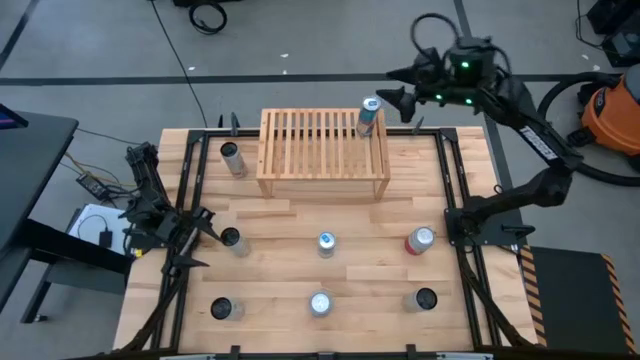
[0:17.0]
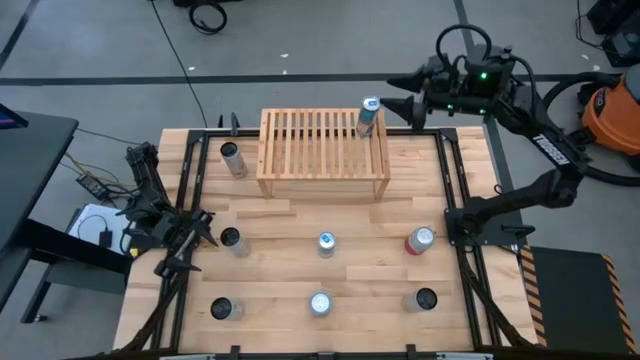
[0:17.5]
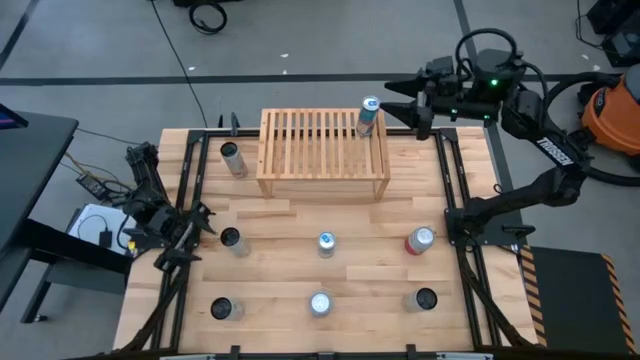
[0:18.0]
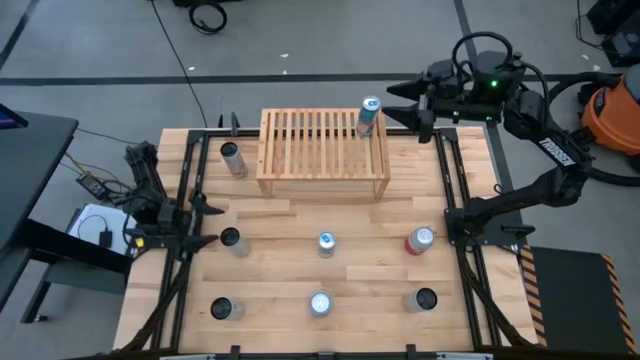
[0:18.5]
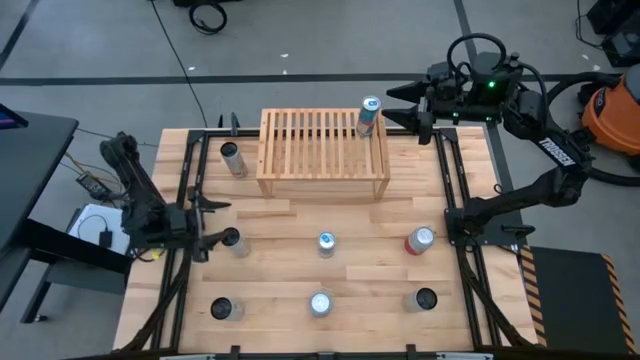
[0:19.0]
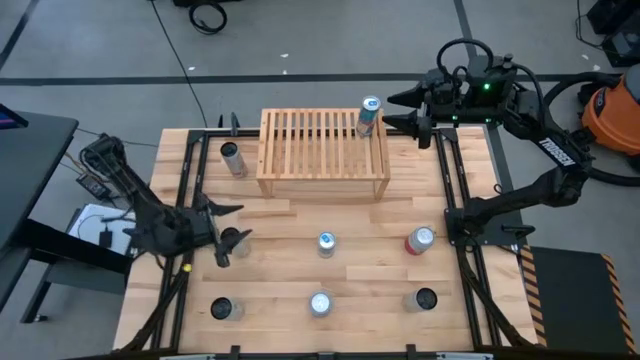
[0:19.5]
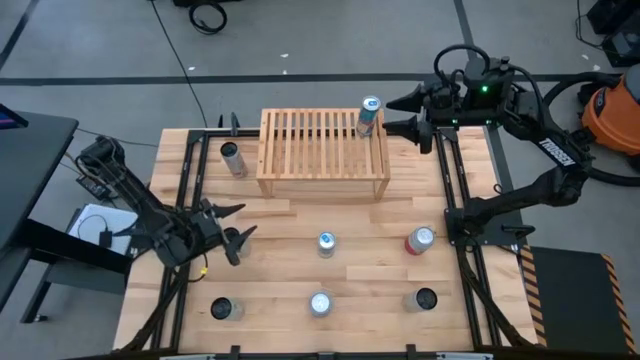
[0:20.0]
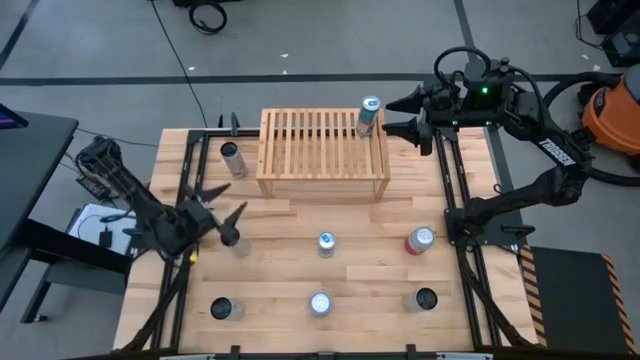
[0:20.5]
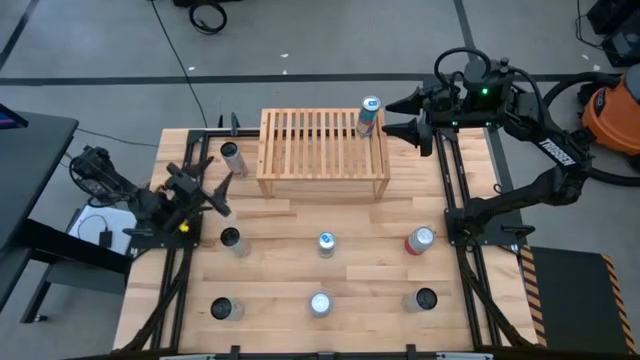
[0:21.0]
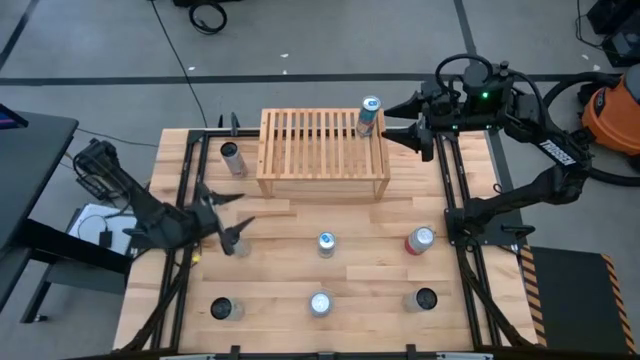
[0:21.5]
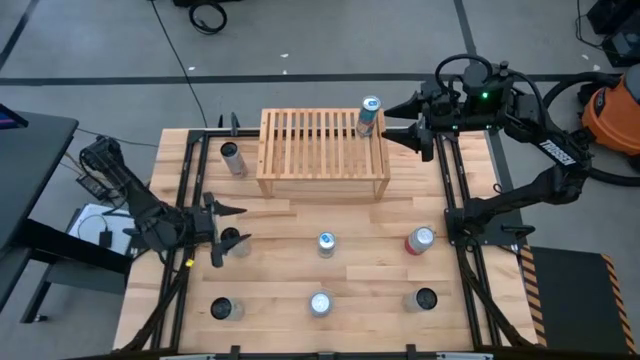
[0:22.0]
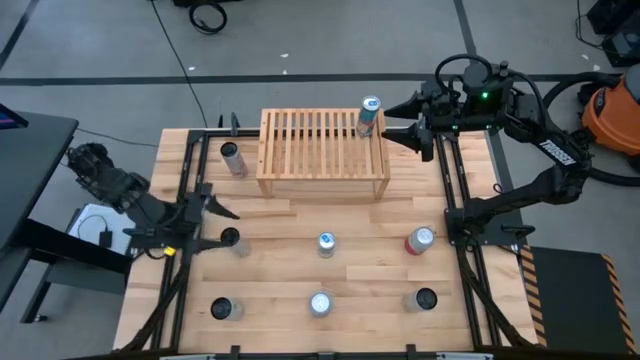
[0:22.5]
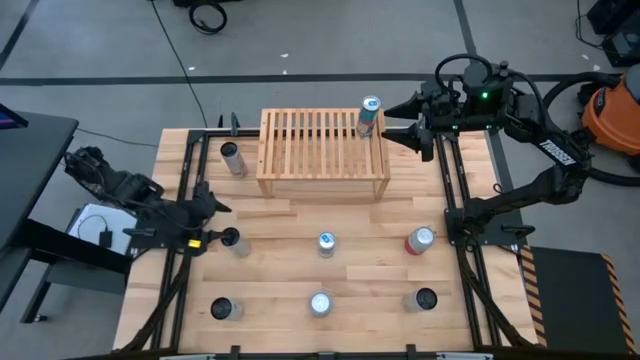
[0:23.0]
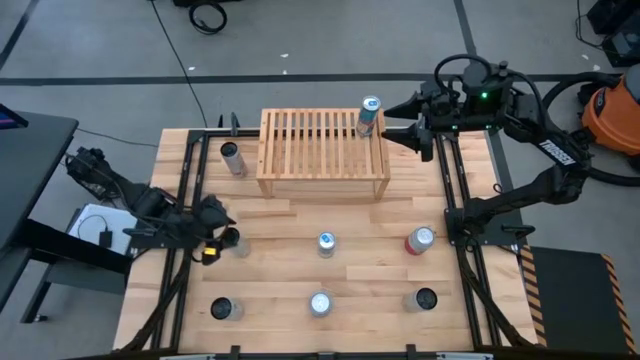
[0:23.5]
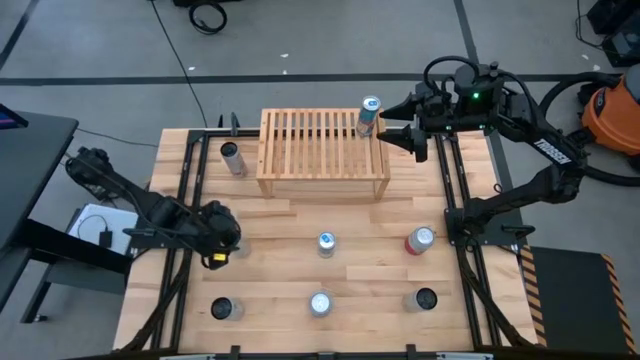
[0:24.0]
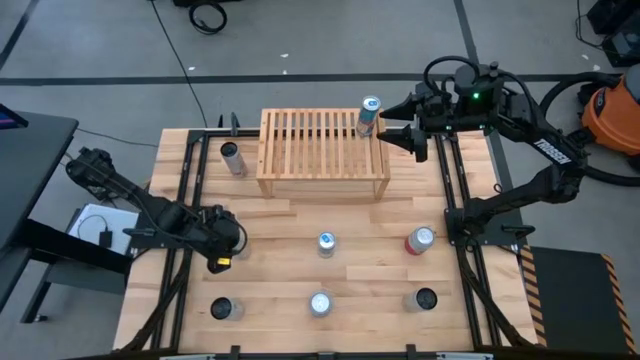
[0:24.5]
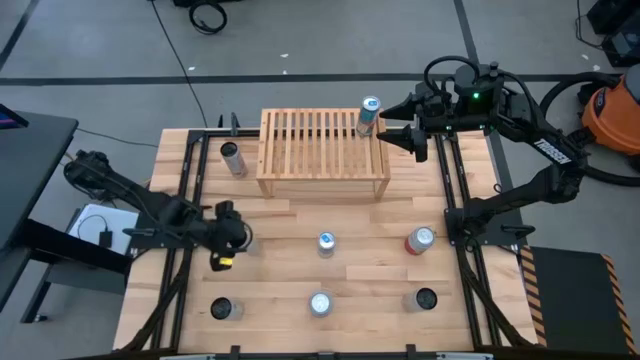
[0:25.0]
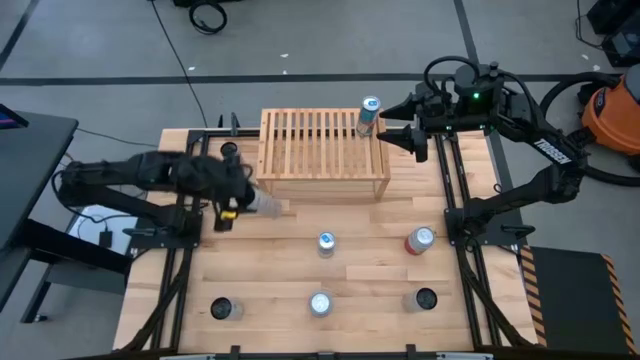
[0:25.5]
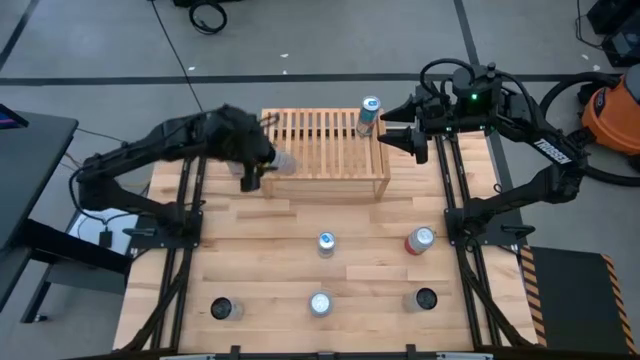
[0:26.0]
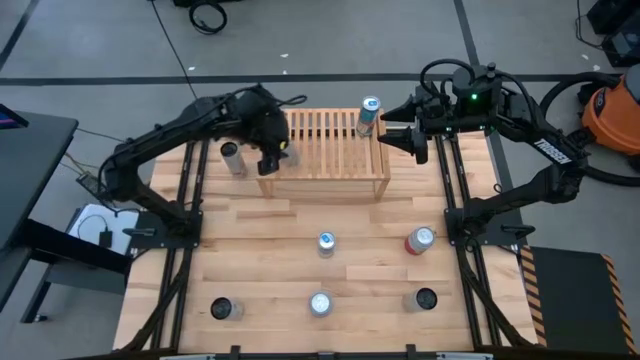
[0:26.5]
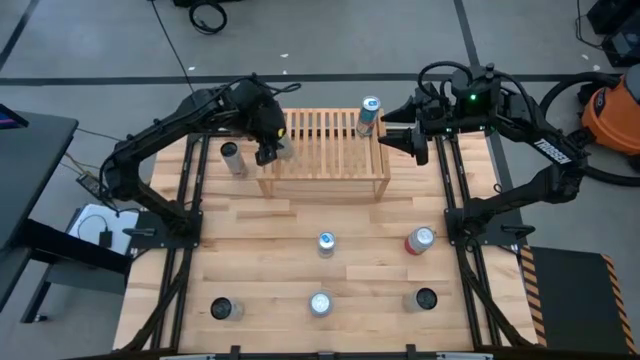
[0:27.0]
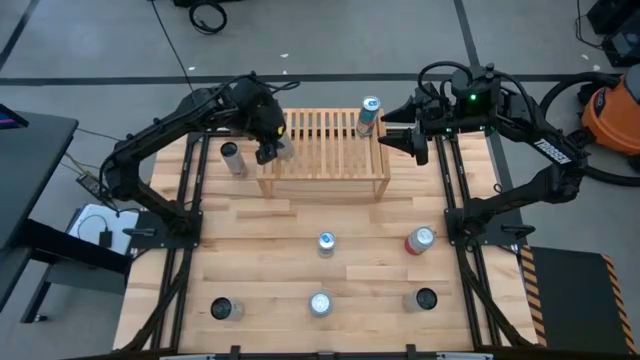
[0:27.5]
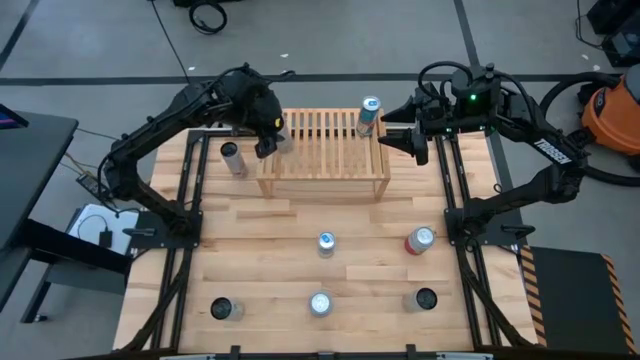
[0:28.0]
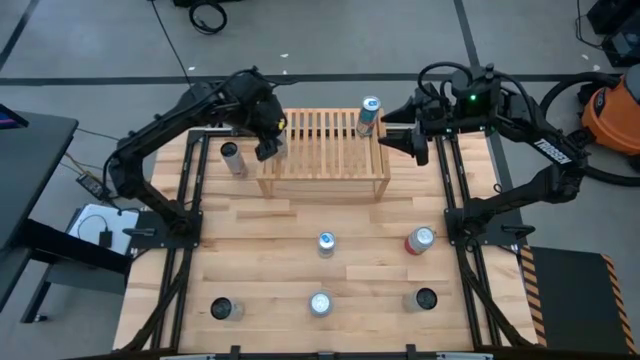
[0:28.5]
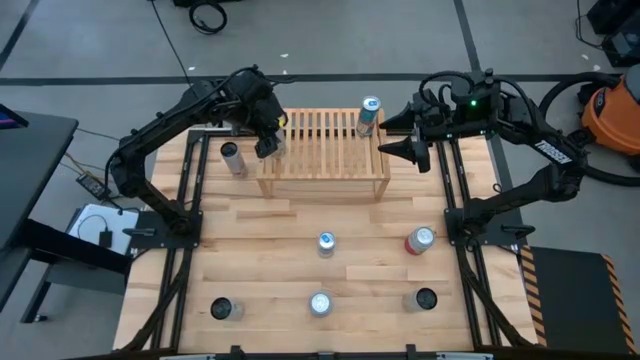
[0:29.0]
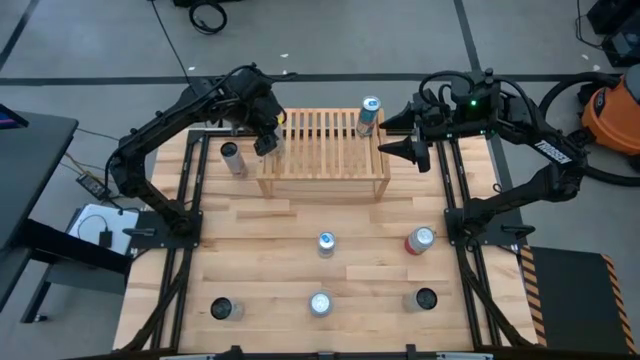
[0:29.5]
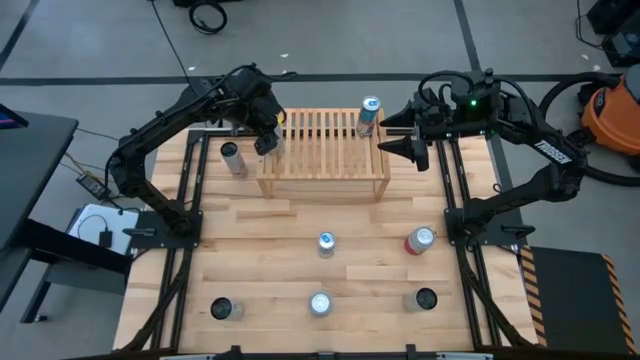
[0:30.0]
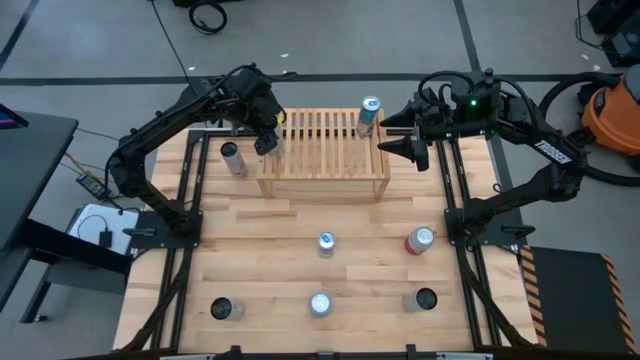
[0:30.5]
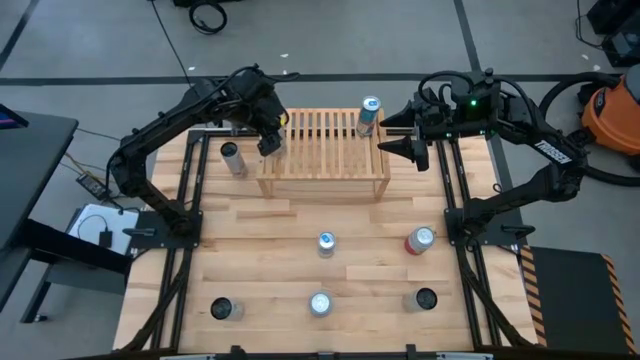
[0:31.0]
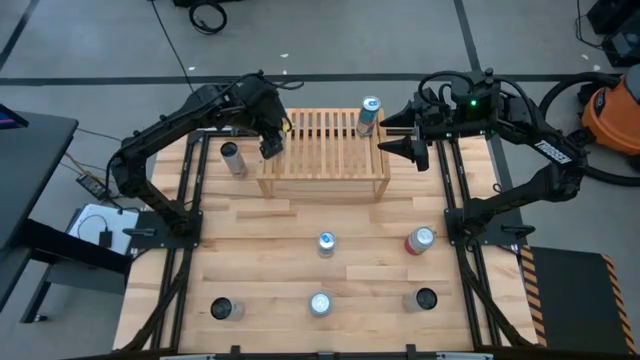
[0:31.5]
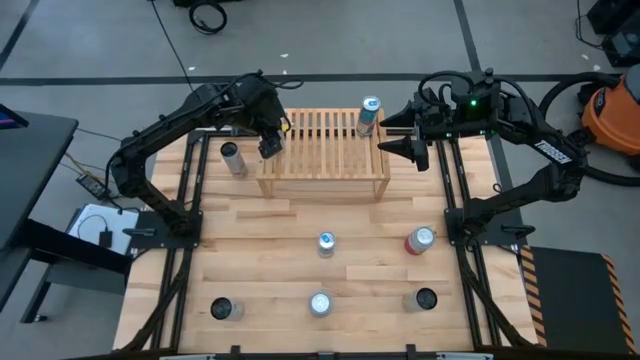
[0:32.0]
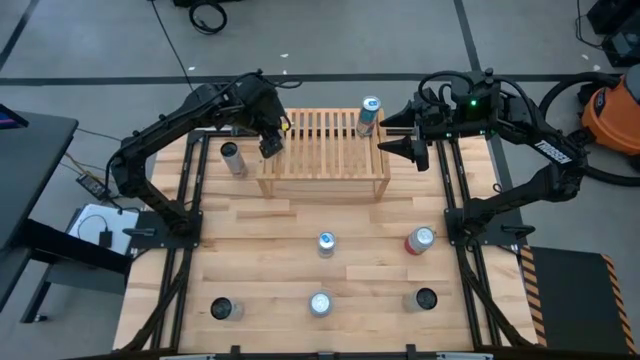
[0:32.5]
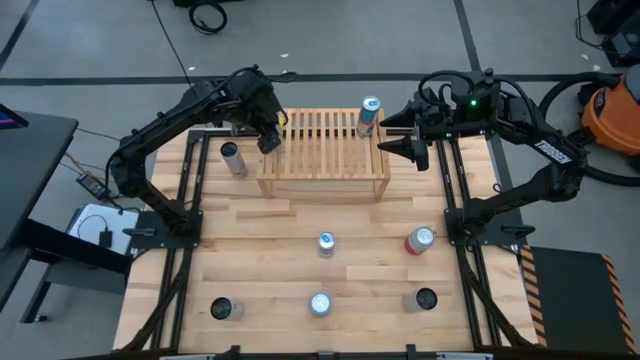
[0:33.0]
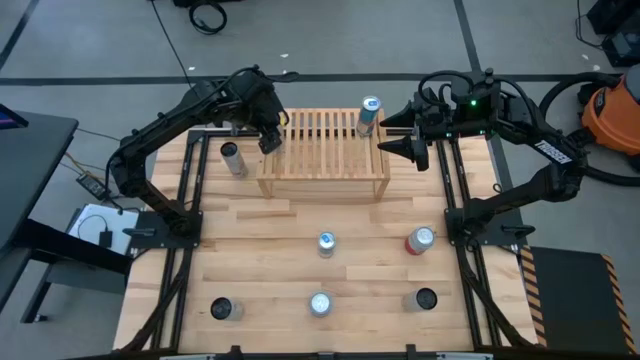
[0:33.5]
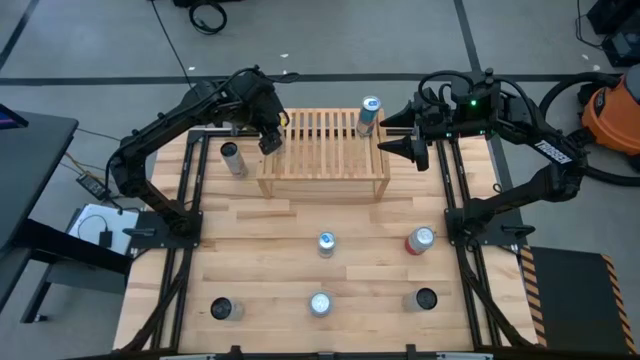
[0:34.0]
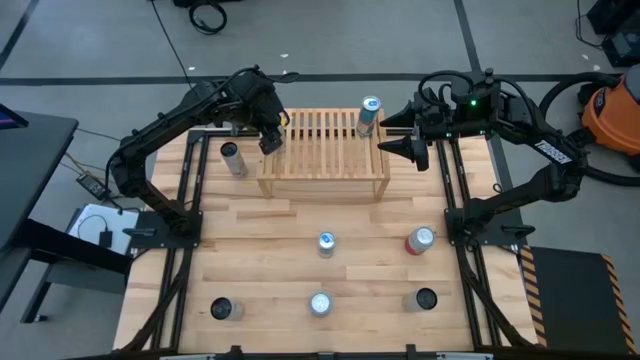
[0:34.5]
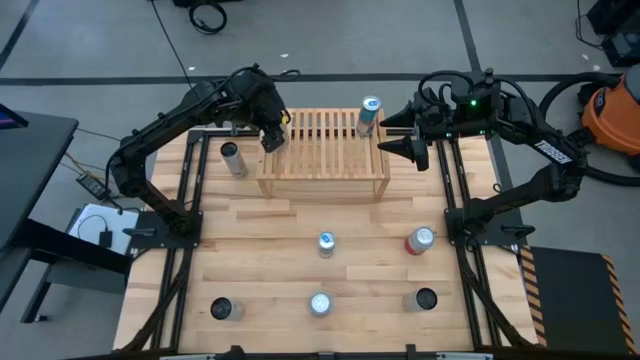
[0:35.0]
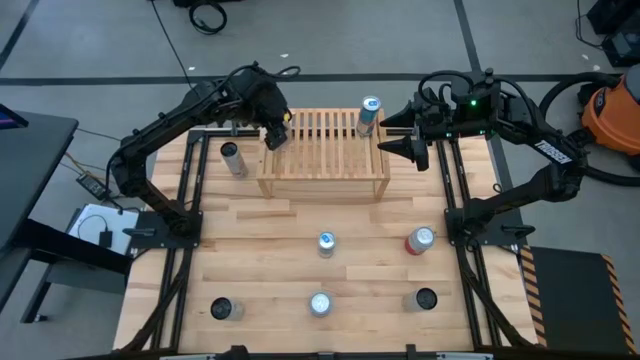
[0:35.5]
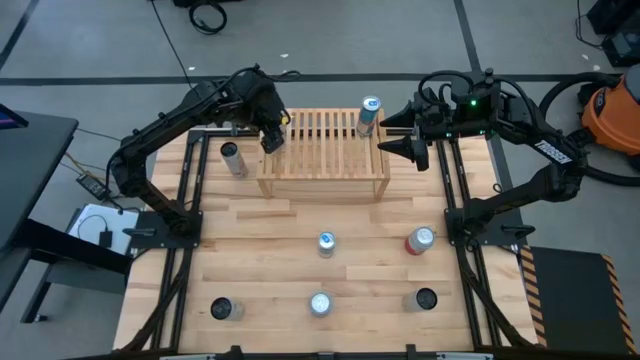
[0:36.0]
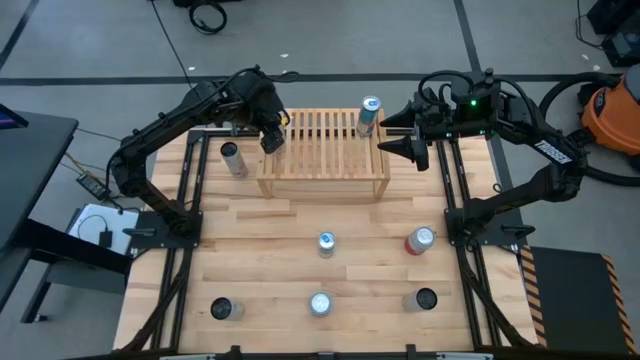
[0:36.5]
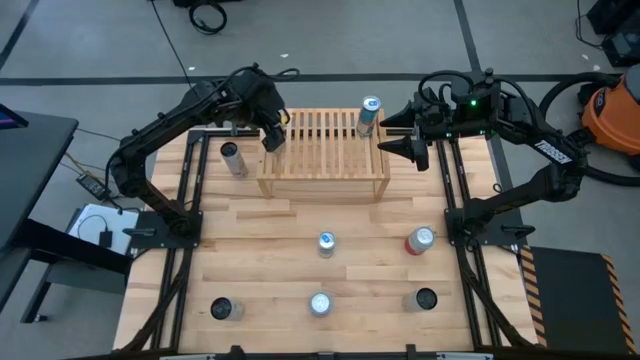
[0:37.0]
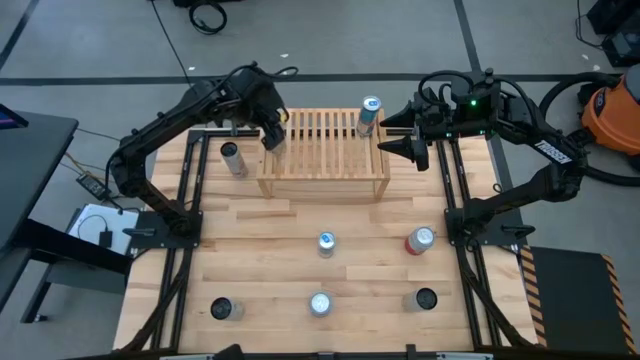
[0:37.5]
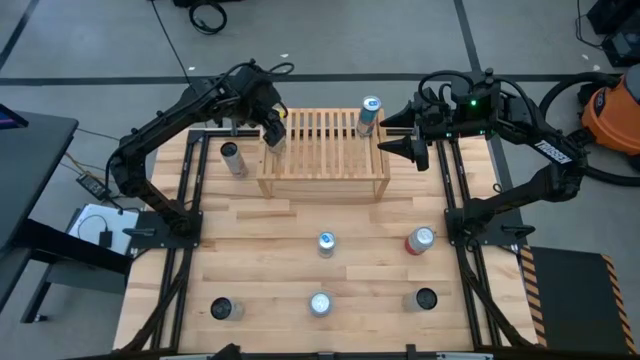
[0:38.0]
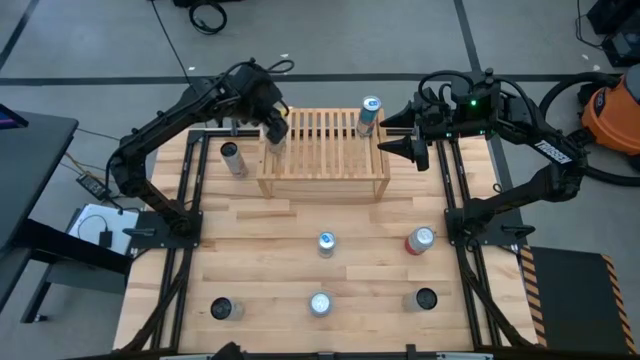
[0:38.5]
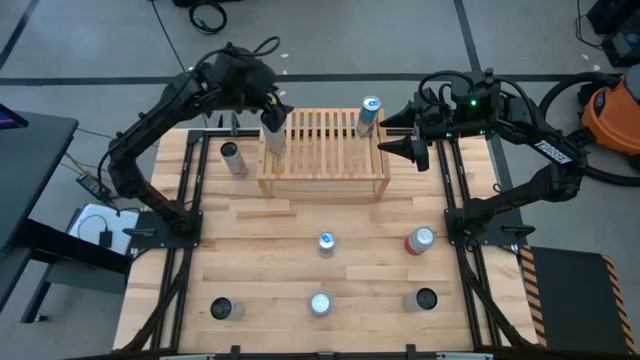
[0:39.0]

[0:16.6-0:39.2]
Task: Place canned beverage on shelf
Put the left white and yellow soda can on the shelf
